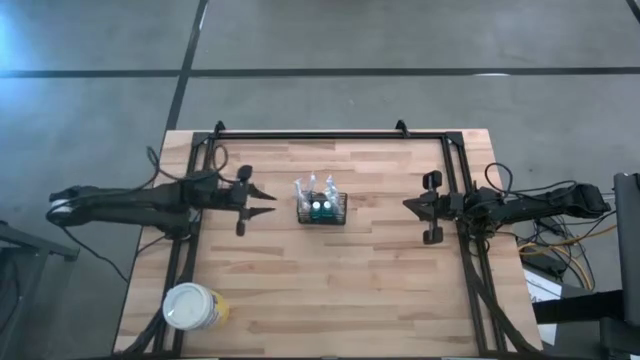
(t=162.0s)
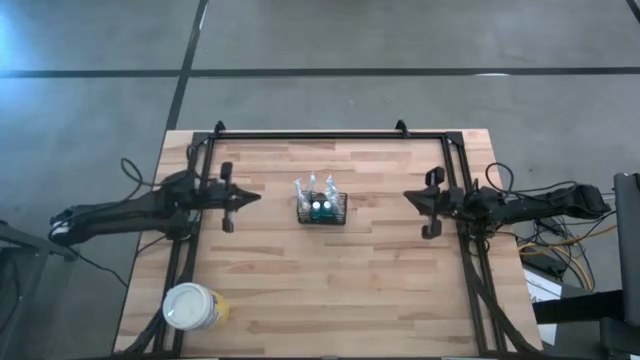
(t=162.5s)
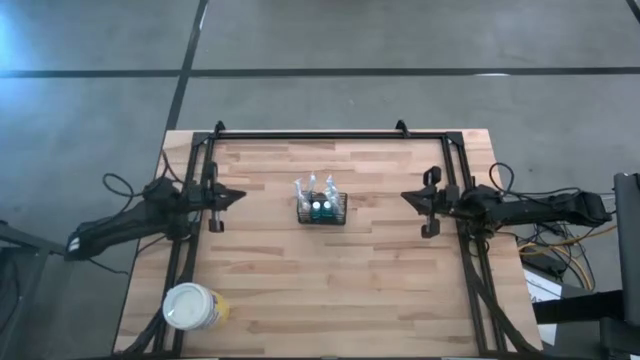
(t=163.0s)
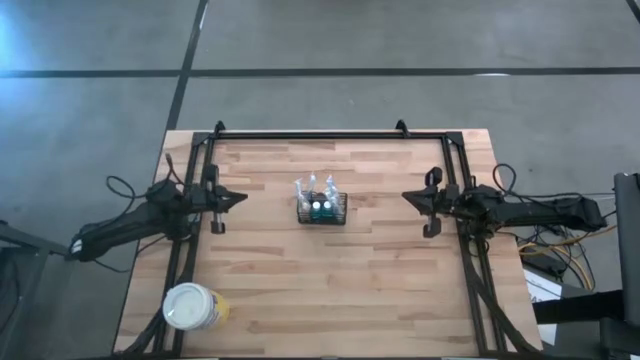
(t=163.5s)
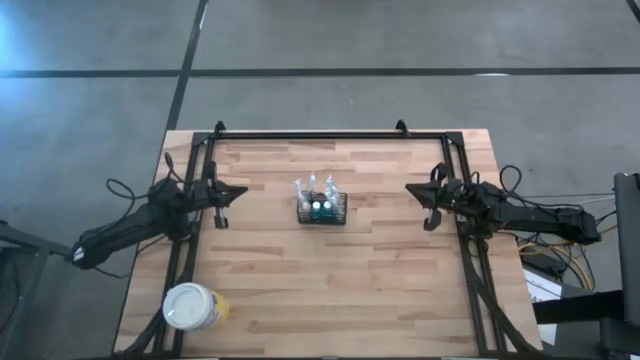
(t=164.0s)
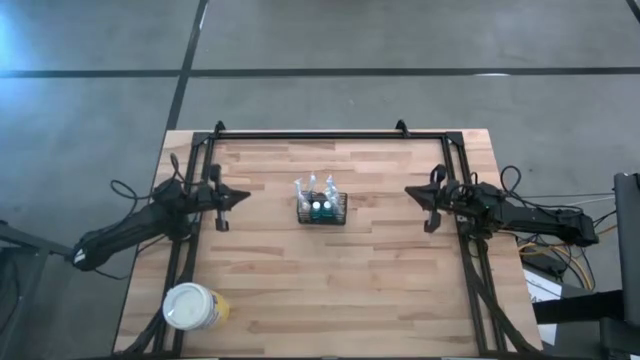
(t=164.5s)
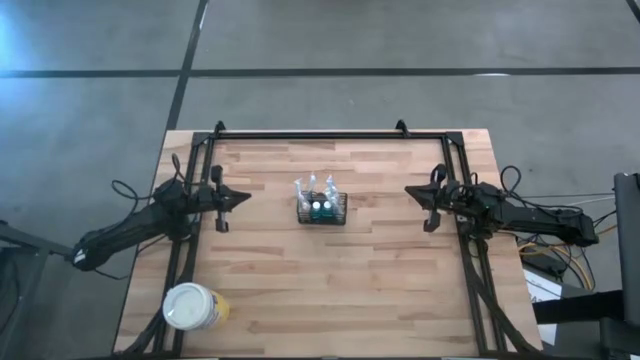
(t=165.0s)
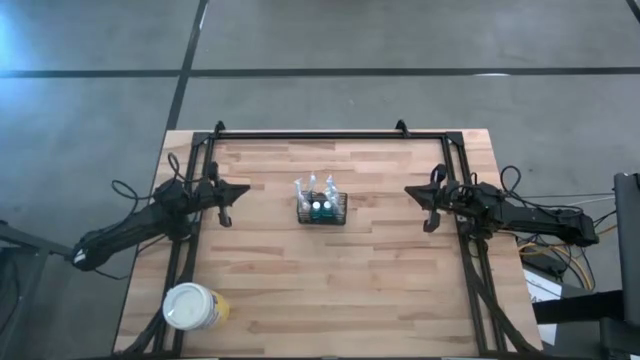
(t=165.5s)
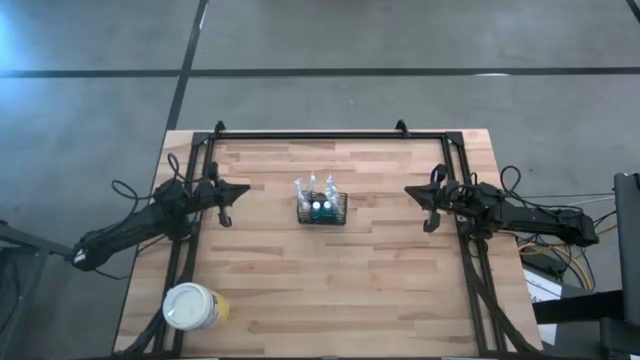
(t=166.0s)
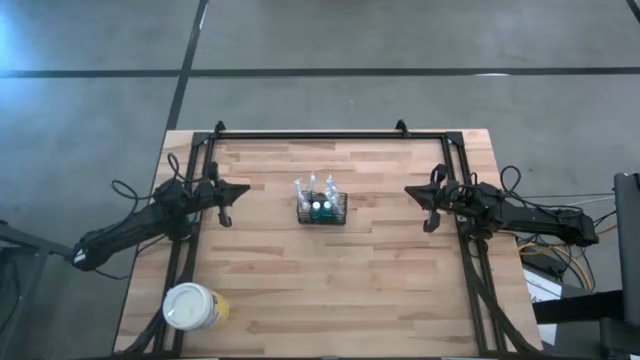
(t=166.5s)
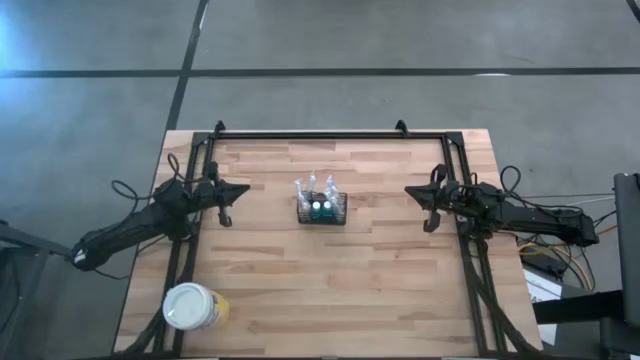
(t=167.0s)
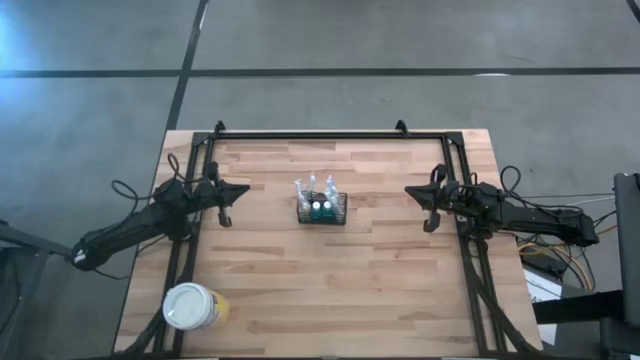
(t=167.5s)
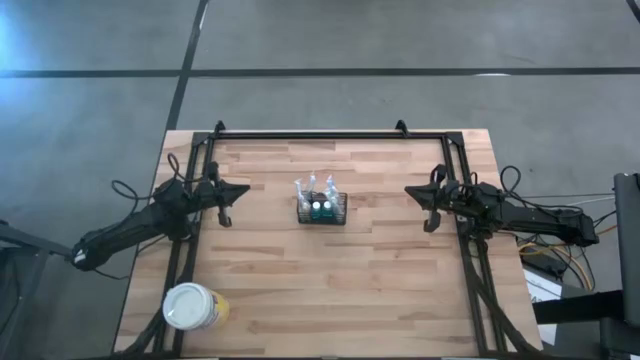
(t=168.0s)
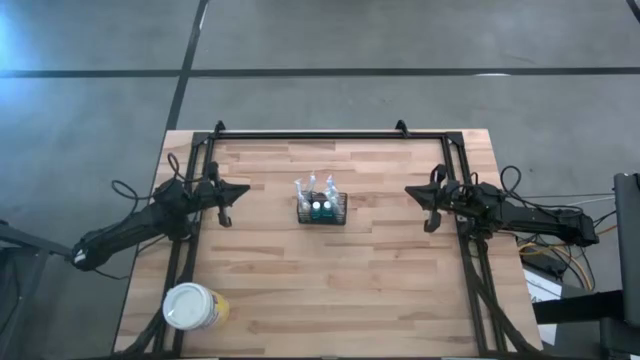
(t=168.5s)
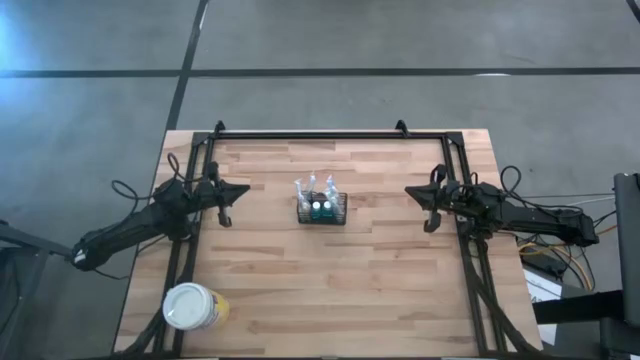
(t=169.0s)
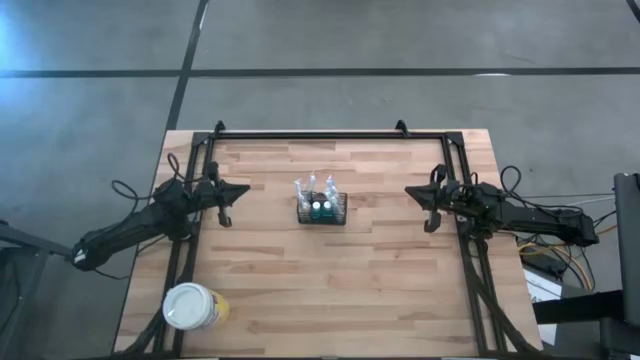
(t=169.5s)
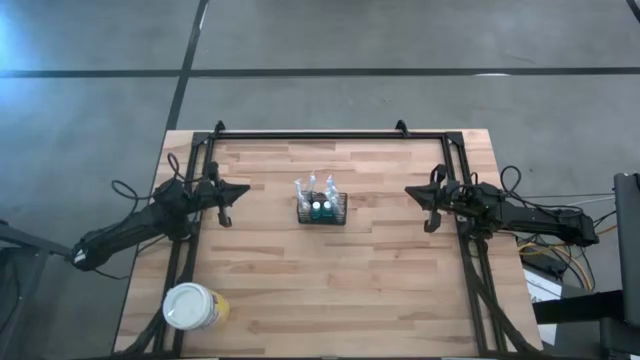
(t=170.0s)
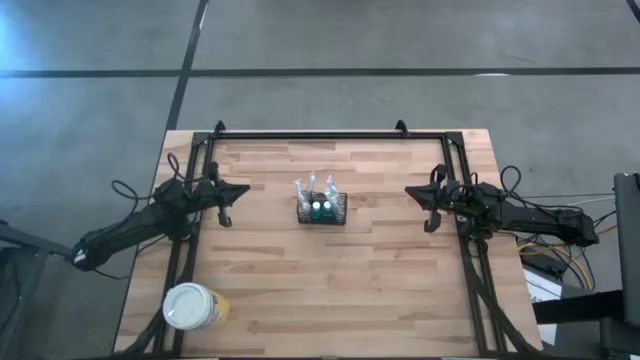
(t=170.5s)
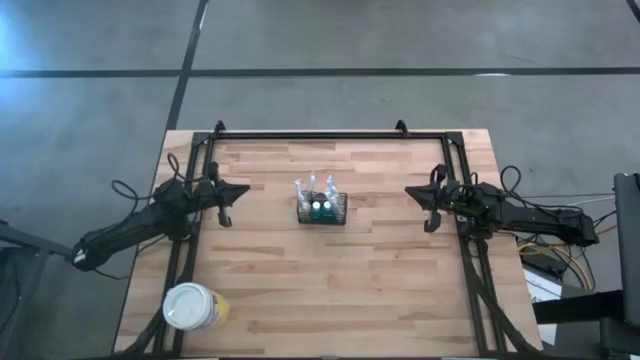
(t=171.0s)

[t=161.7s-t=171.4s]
Task: Pick & Place toothbrushing station
Return to Home Position

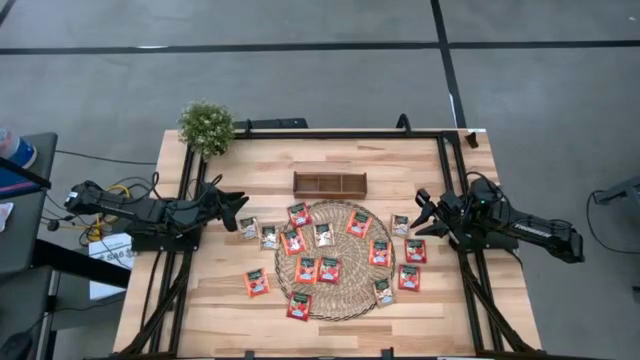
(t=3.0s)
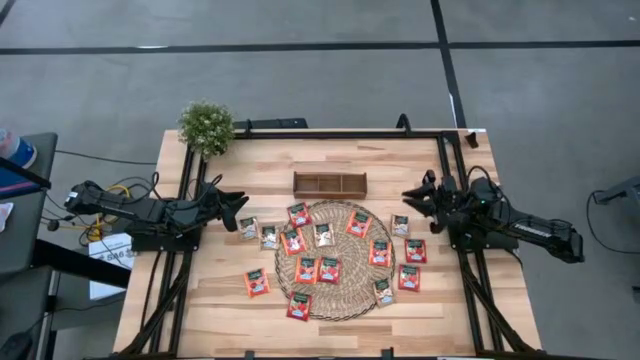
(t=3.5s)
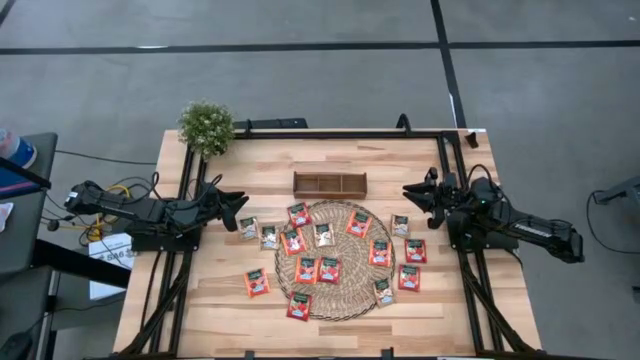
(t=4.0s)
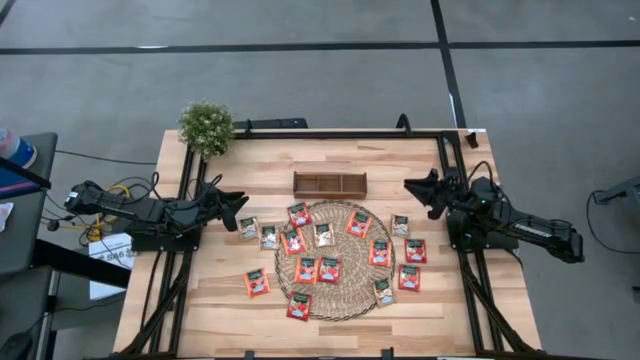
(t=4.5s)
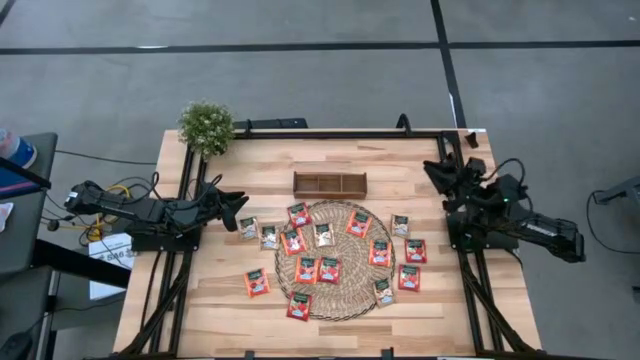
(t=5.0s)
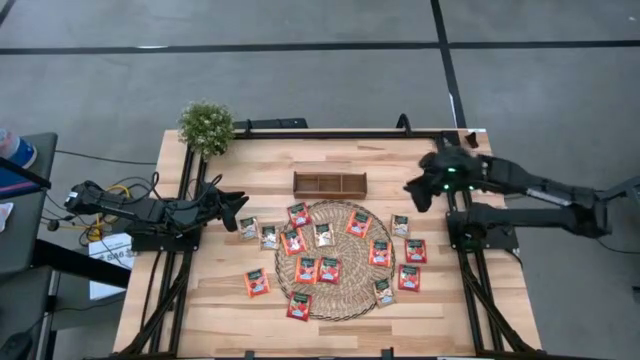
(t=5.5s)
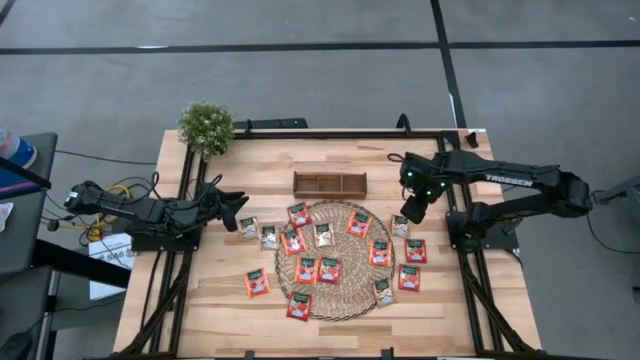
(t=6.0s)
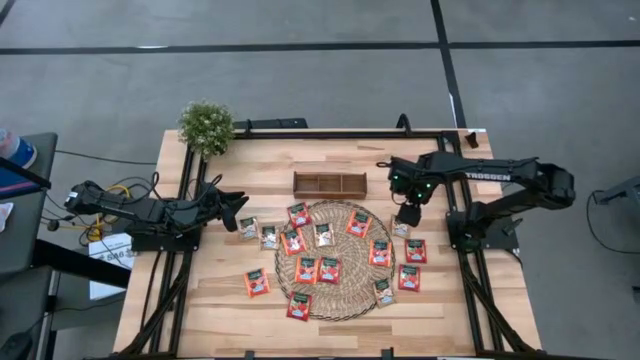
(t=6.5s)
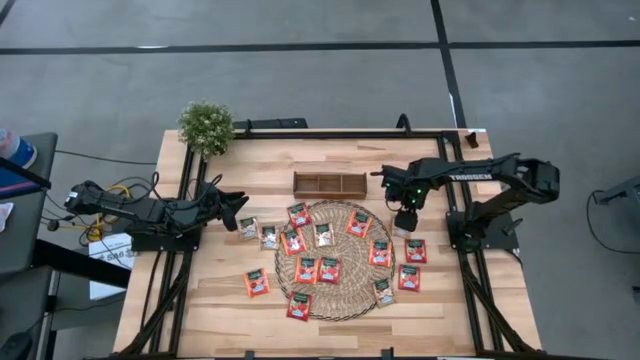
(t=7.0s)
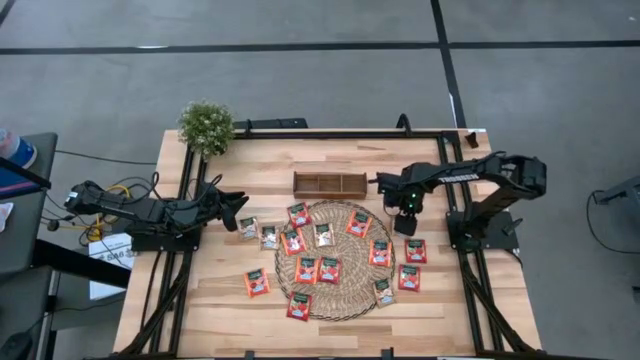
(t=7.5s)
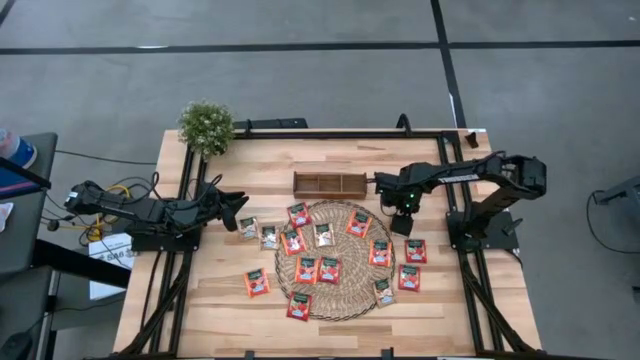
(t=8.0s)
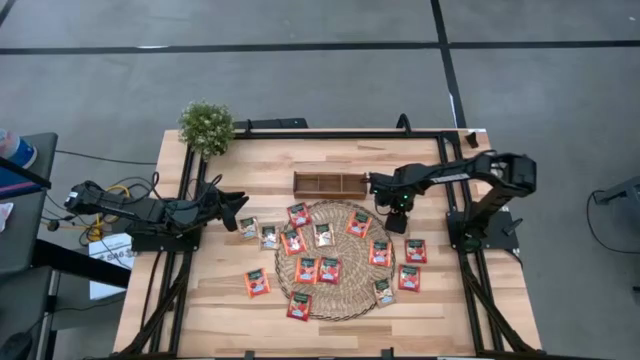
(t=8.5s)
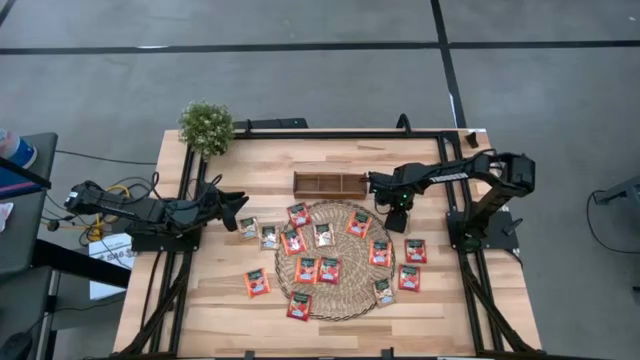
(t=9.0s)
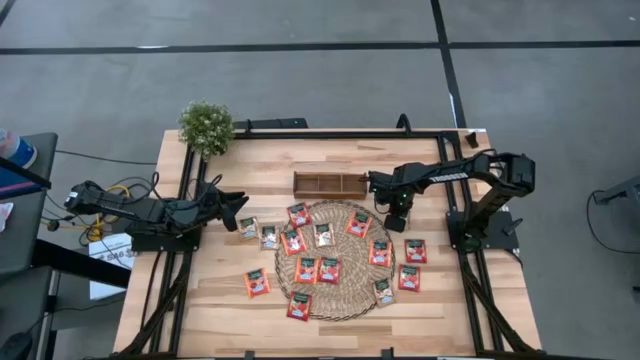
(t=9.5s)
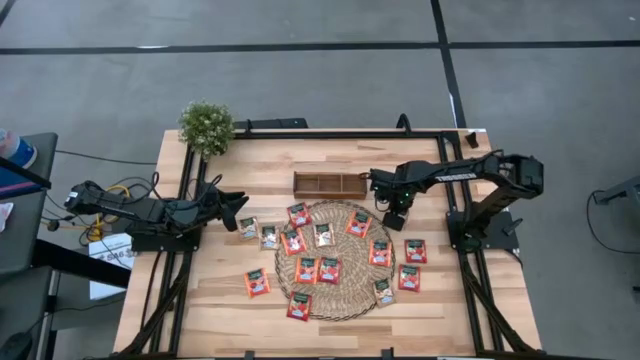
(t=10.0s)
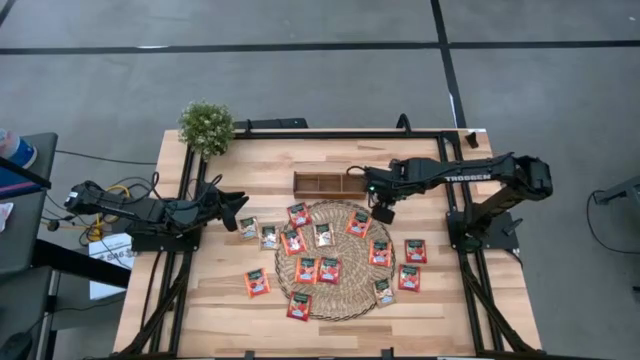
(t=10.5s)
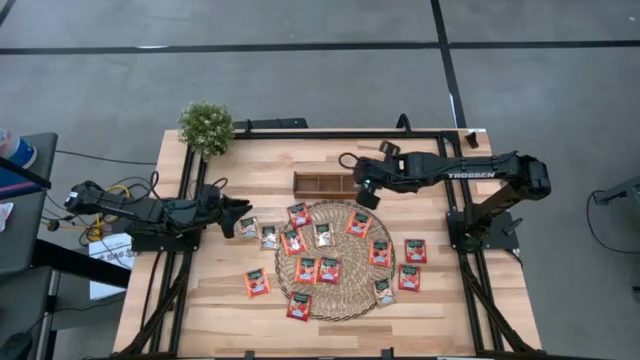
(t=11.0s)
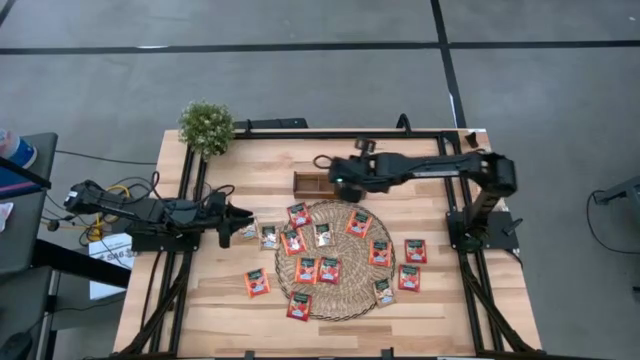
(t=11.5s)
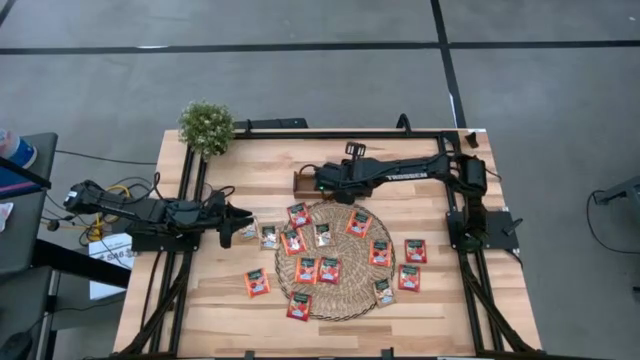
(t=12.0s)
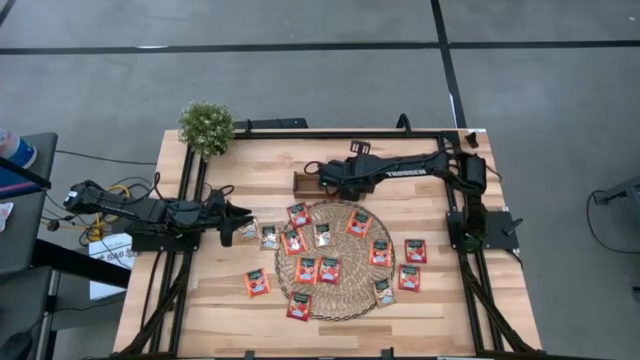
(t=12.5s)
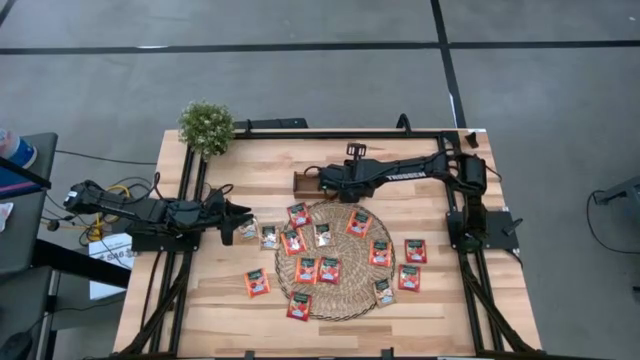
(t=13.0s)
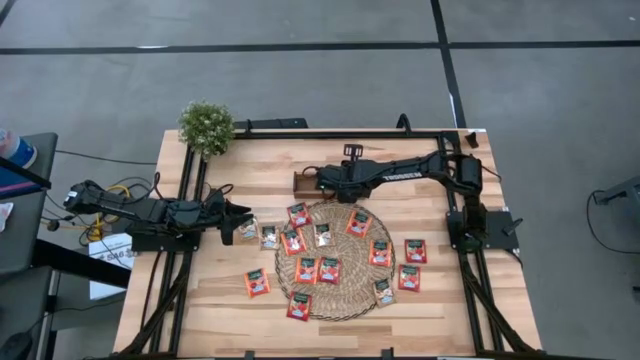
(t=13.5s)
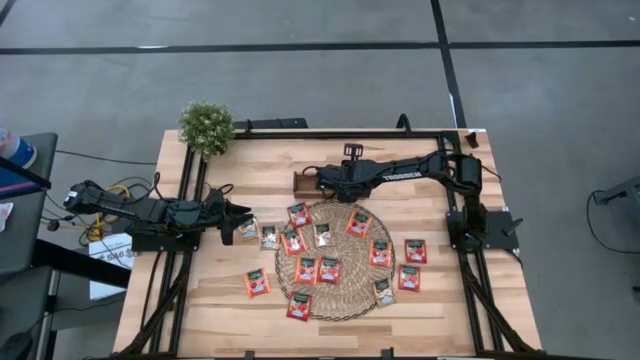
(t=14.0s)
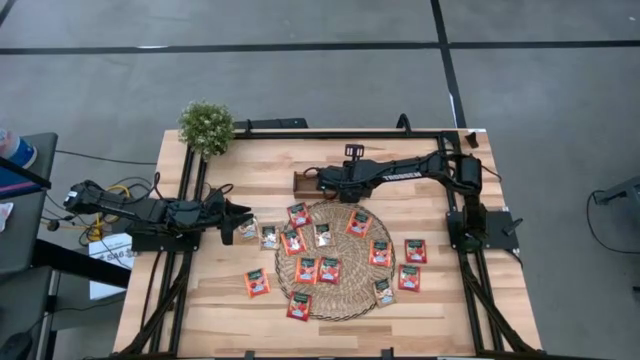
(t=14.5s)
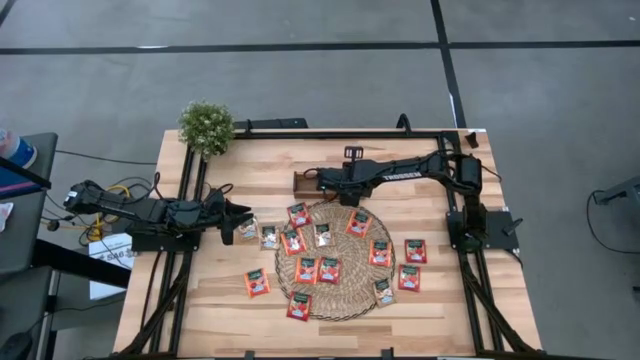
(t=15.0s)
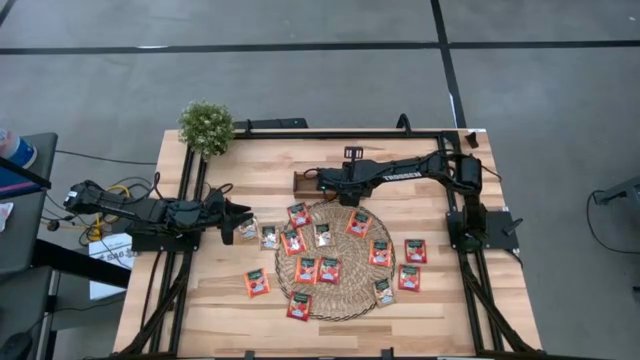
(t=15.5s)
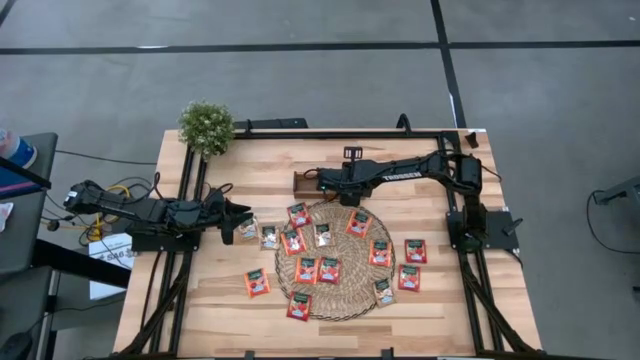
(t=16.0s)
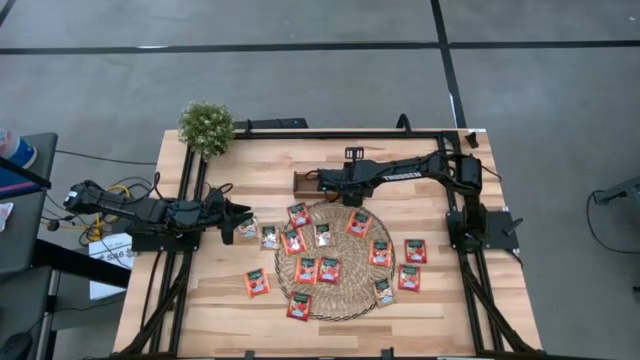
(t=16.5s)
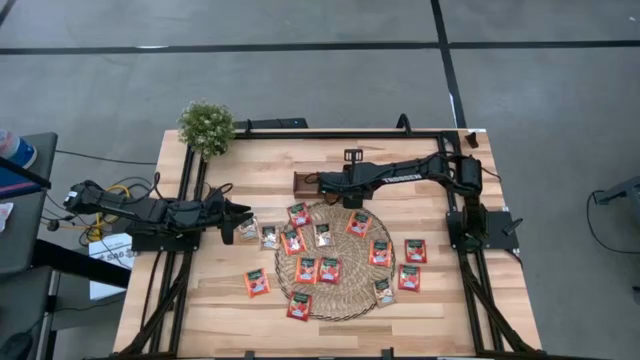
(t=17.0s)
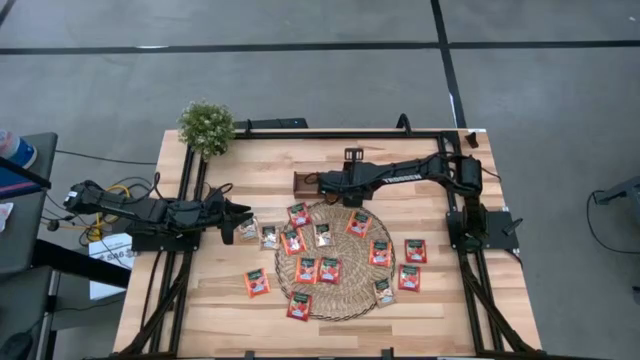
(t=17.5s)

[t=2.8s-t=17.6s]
Task: Pick & Place Tea
Put the brown tea bag into the right section of the wooden organizer
